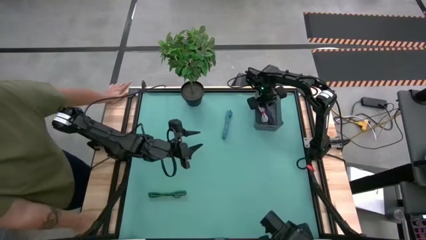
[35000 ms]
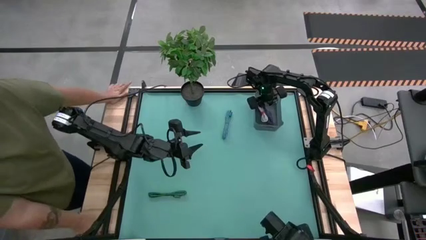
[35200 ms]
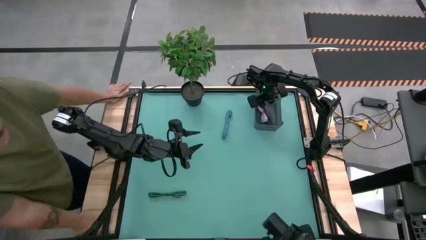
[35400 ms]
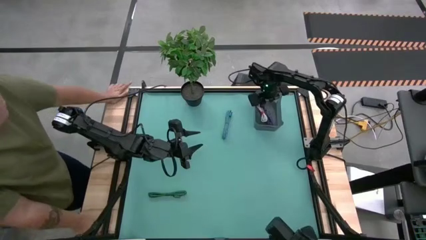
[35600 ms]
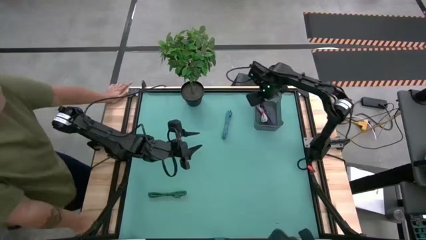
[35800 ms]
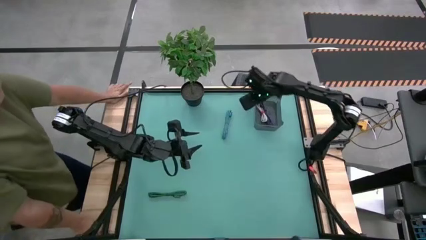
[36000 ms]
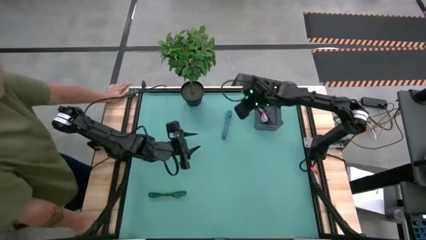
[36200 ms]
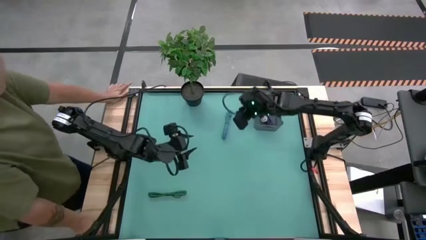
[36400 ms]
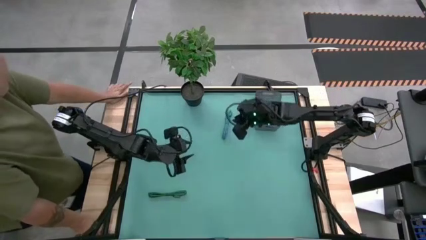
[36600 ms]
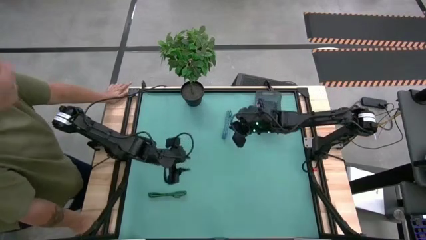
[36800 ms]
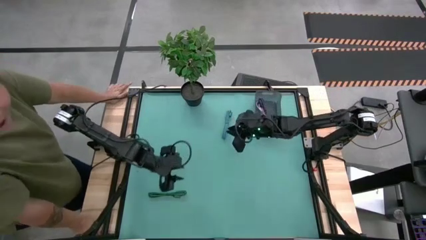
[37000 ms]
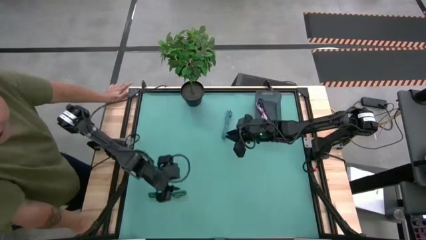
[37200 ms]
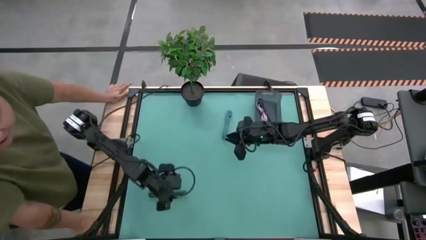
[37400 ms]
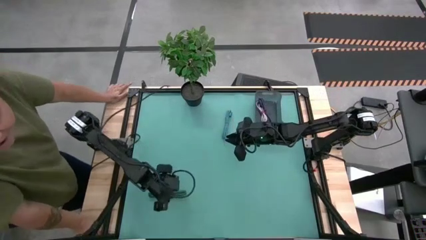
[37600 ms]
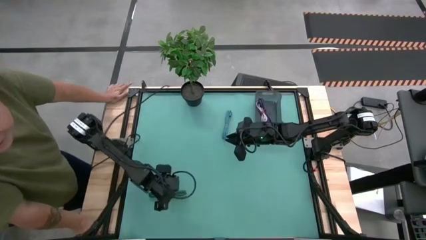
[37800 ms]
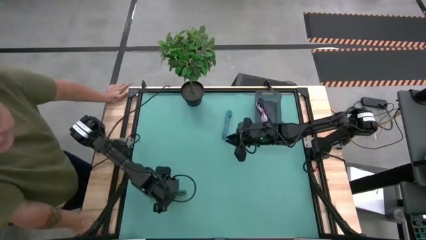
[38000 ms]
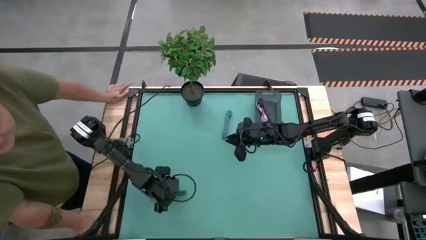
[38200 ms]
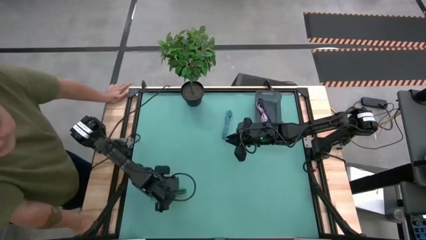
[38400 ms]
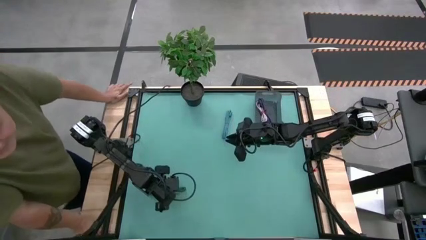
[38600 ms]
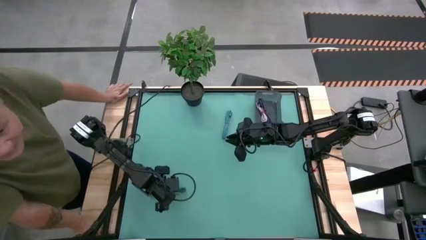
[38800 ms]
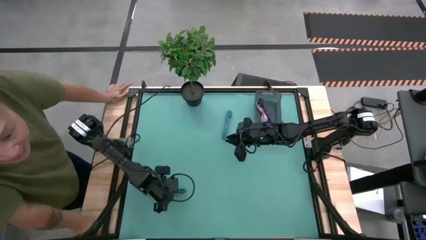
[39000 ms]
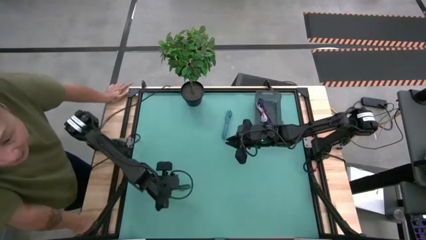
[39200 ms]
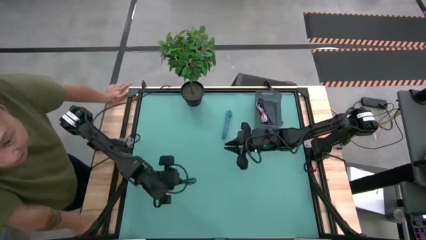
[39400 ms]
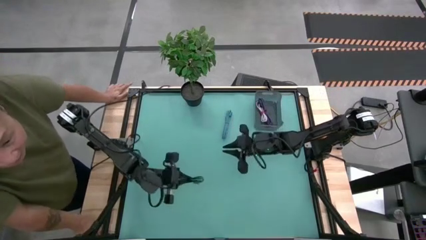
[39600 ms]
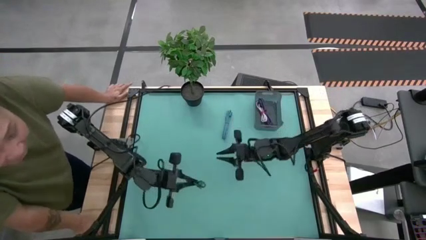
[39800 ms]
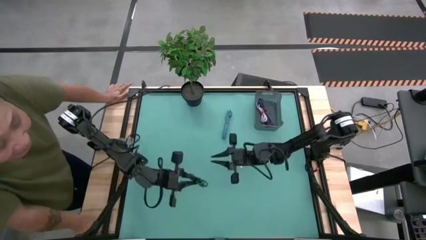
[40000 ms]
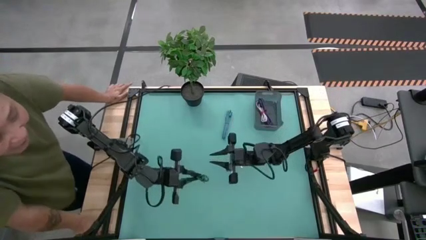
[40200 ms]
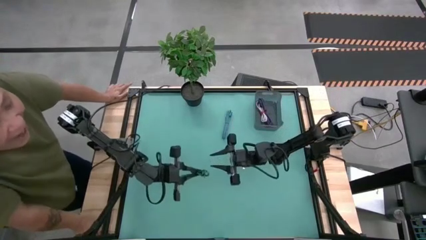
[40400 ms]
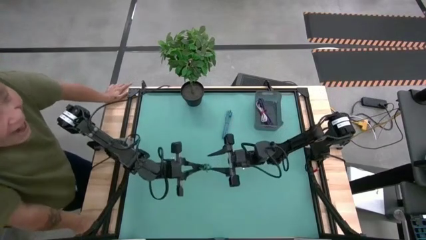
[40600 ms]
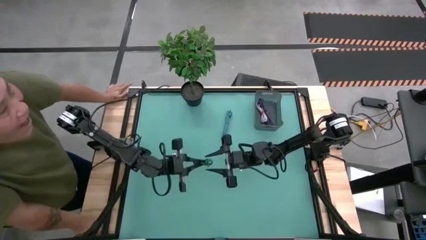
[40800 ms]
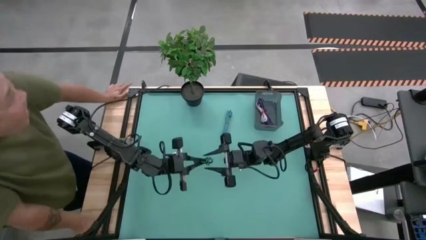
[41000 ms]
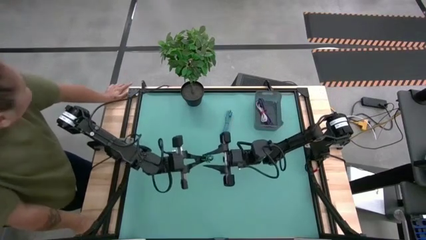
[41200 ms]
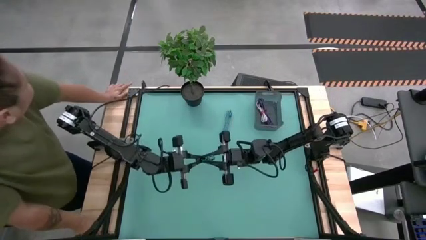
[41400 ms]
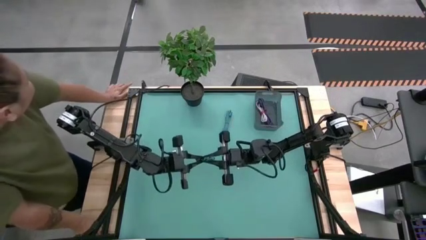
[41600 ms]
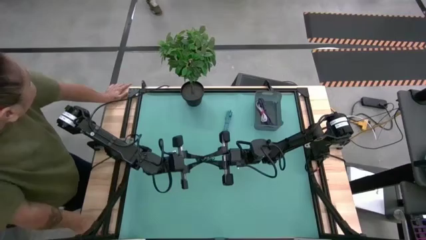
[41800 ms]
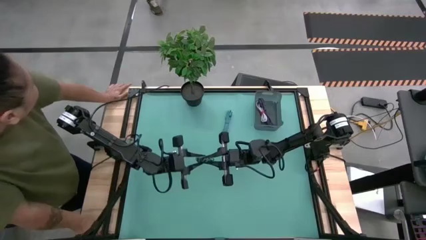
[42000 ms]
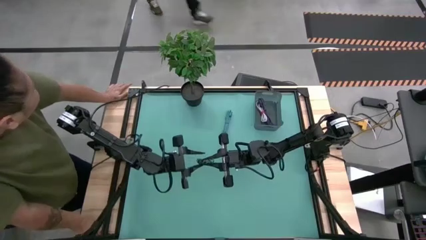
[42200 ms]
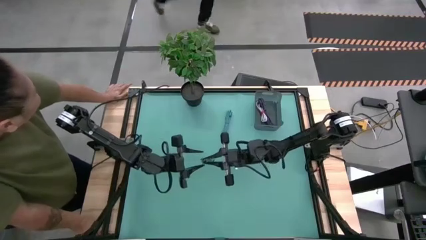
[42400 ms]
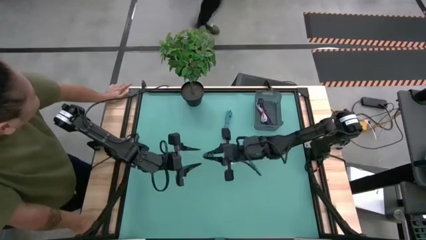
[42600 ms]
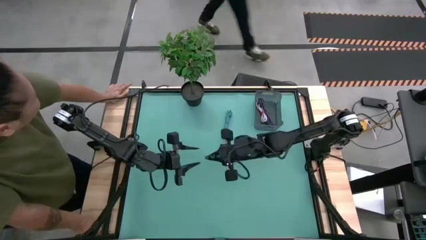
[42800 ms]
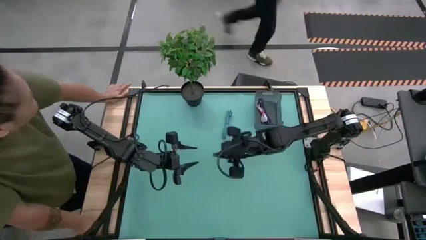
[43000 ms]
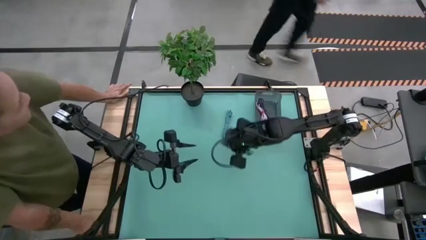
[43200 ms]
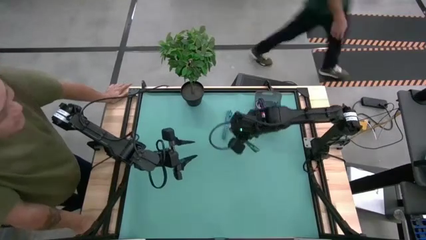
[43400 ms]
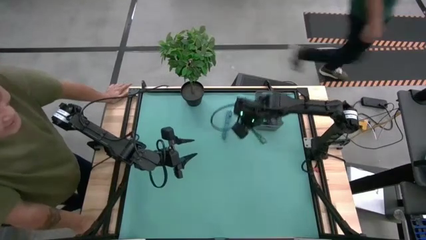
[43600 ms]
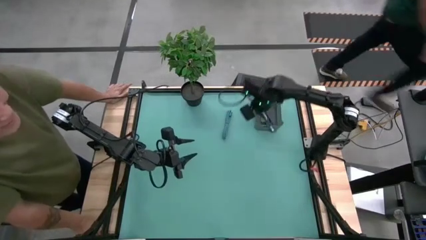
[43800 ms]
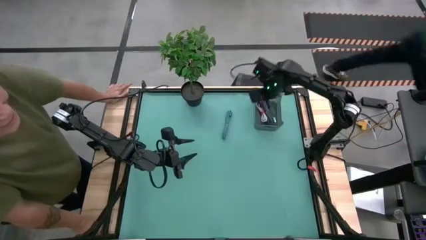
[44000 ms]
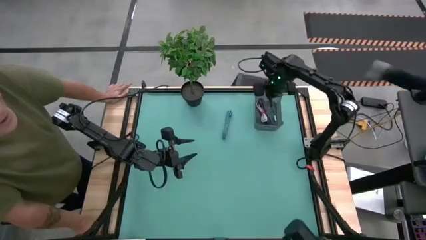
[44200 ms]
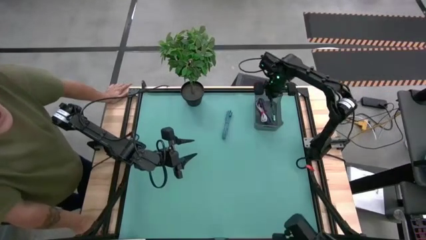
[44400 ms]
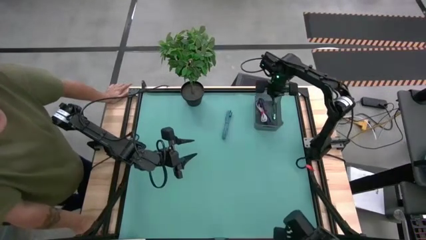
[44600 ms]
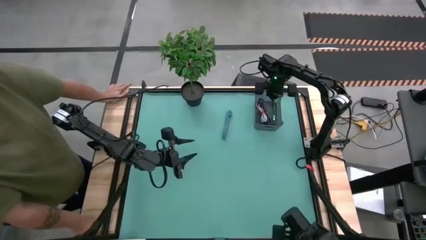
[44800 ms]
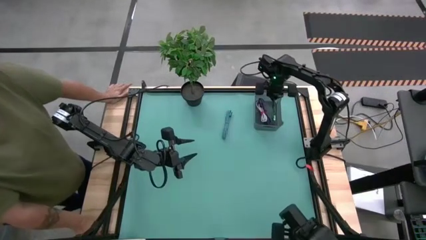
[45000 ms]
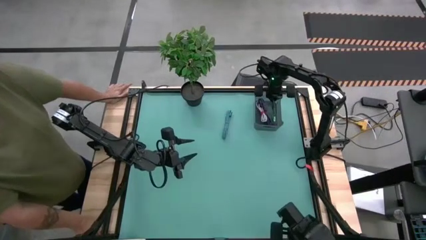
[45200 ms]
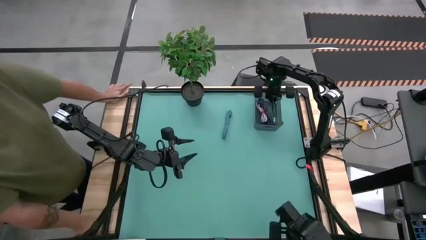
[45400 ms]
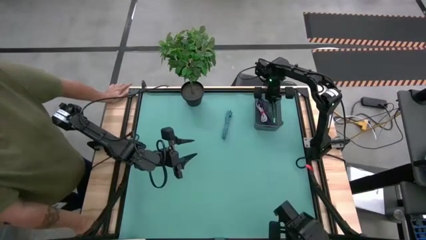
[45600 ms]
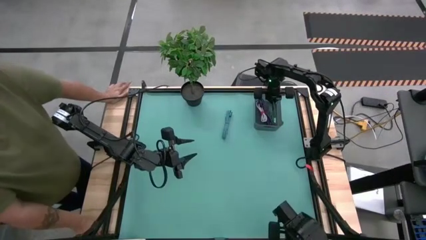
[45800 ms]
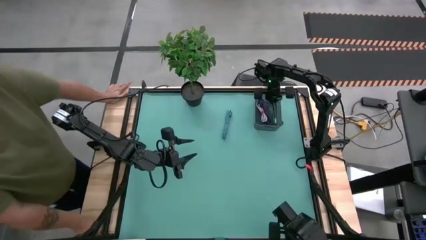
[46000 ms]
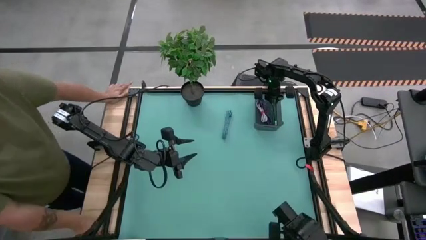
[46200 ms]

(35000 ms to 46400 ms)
Task: Pick and place USB-C Cables
Put the green charger cable into the black bin

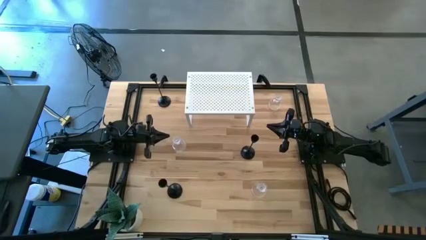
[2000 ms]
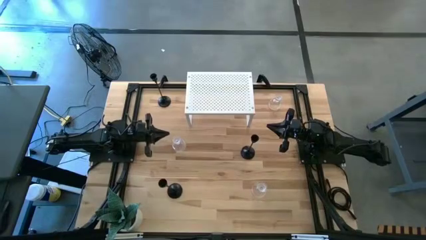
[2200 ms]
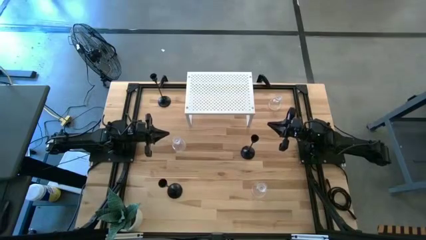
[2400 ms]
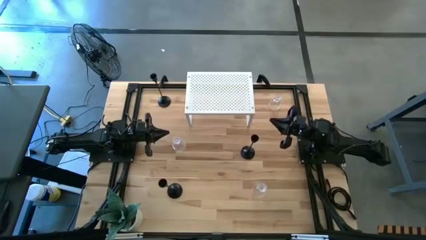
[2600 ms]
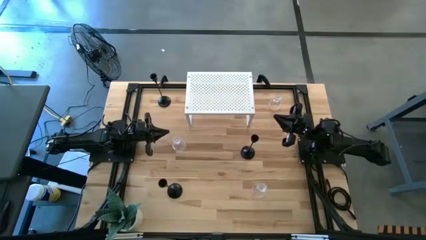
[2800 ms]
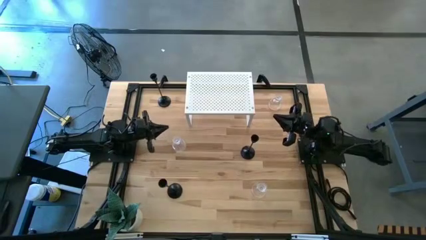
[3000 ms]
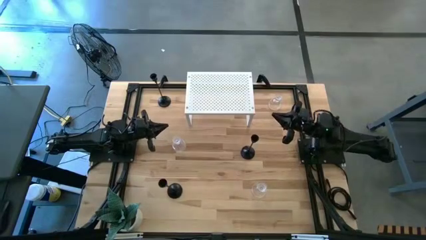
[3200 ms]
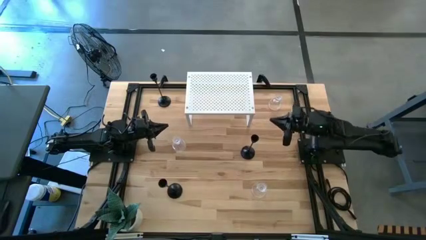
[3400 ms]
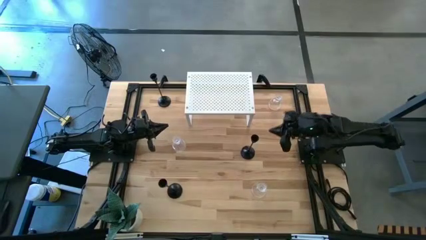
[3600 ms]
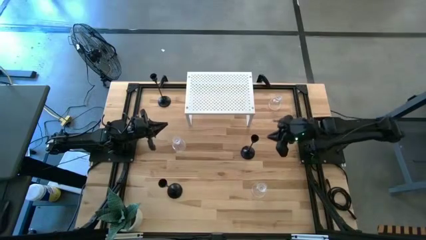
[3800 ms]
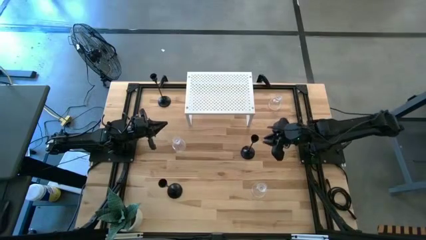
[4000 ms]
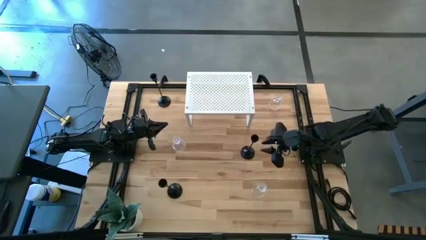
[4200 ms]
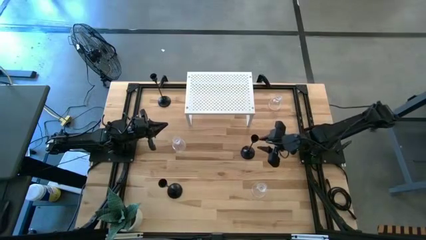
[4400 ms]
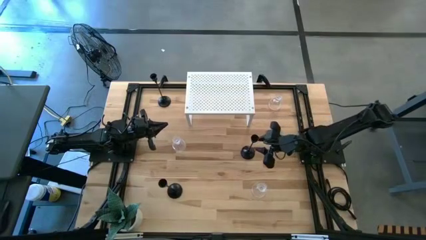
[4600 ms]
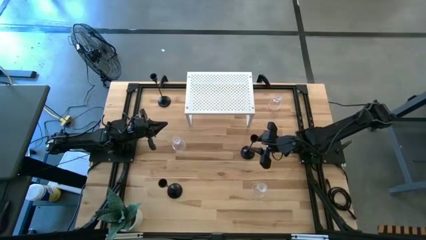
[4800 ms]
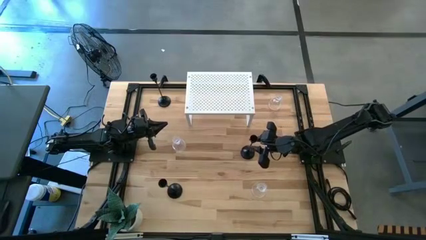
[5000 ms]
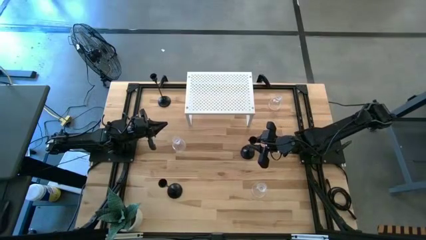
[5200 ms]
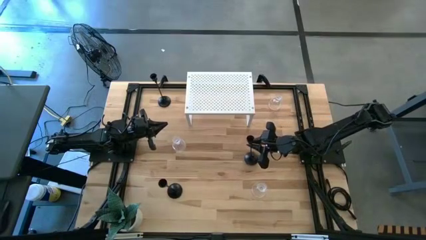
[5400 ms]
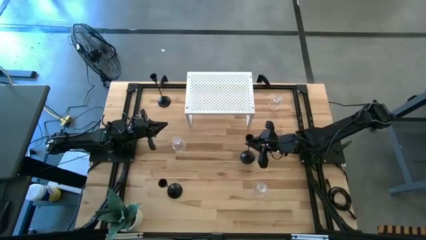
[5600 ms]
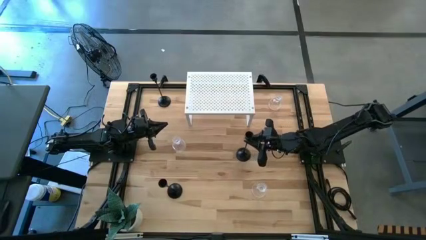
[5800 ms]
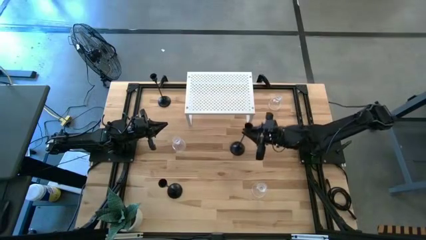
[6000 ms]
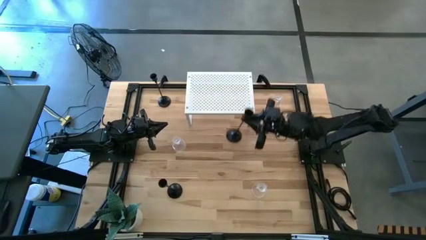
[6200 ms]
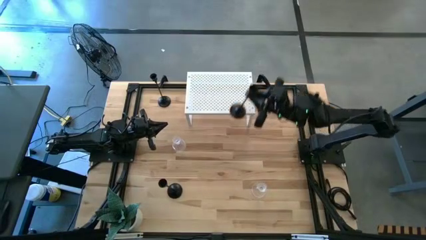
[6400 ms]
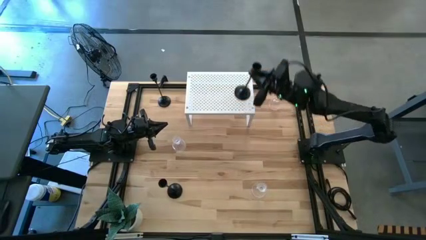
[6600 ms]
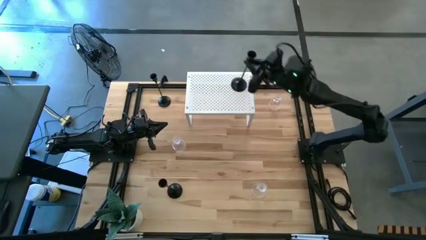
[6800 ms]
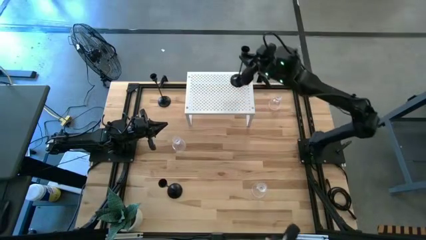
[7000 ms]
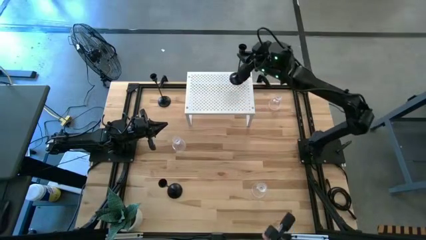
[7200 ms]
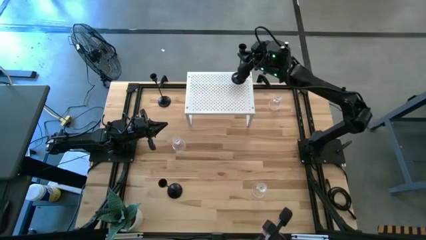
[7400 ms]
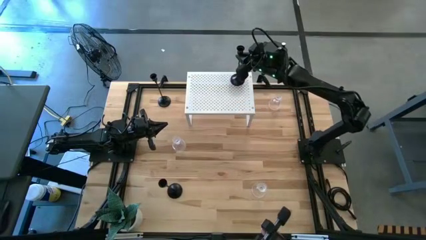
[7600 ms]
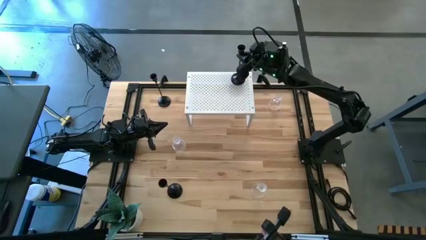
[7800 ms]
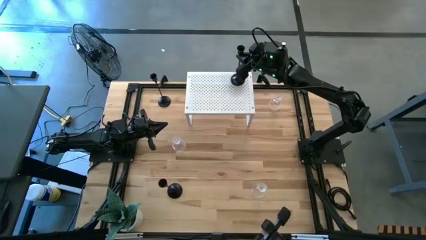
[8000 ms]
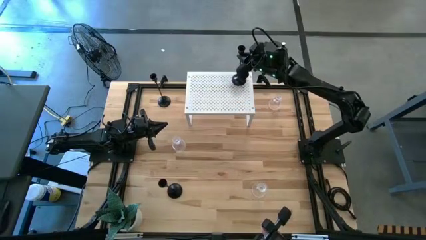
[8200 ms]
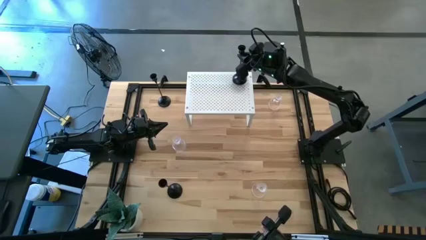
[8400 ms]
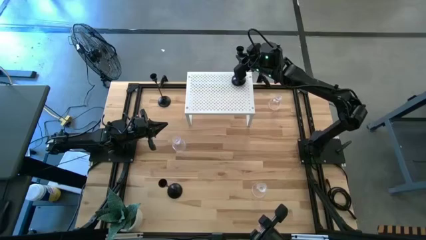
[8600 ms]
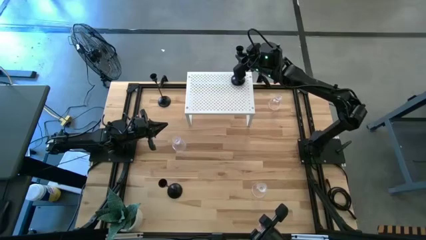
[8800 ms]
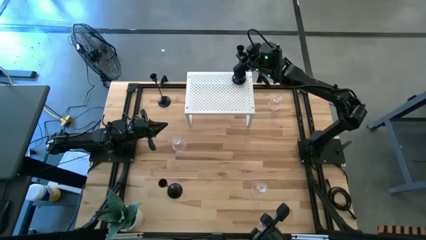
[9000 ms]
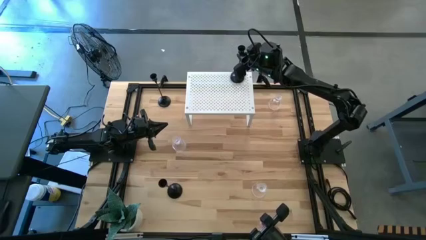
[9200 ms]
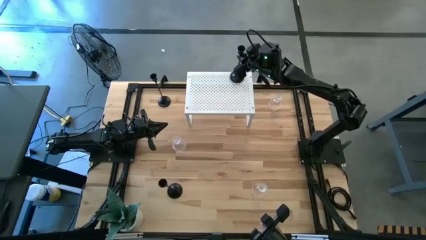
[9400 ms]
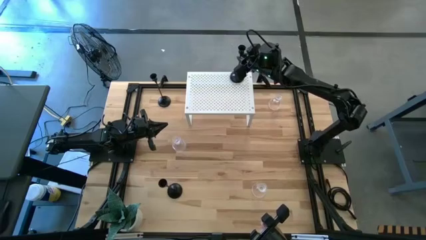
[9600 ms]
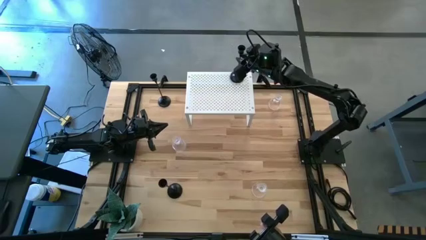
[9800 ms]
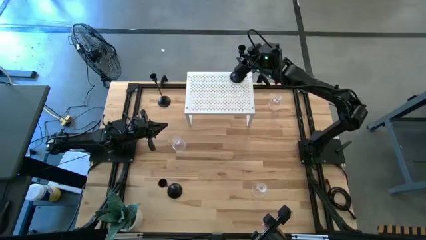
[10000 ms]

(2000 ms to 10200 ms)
Task: Pick & Place candle stick holders
Put the middle black candle holder on the shelf
